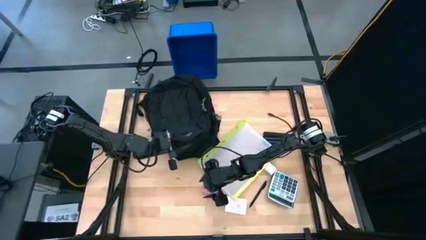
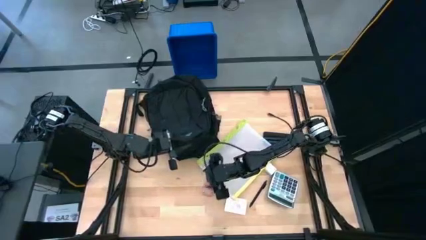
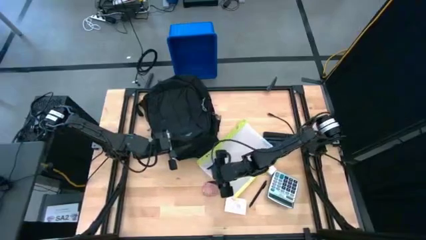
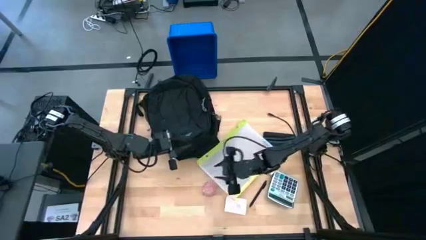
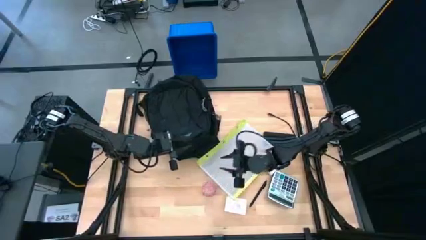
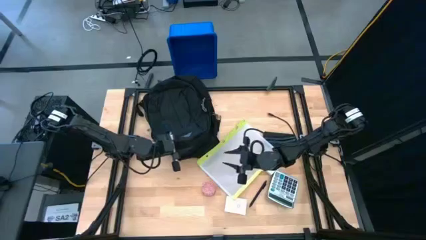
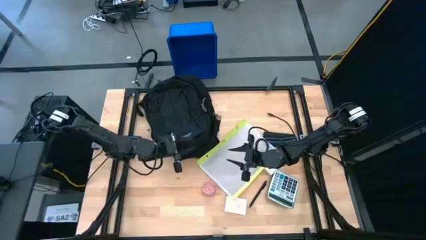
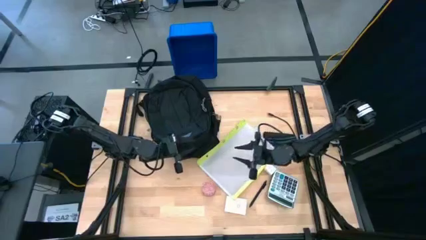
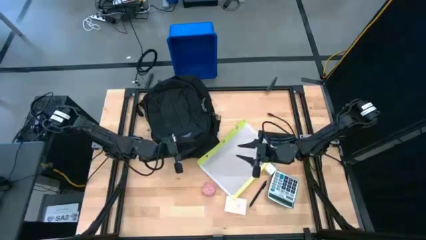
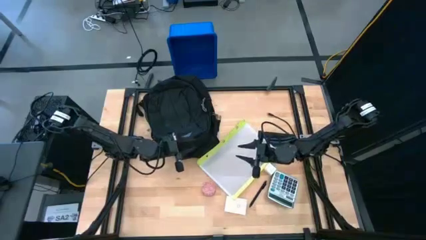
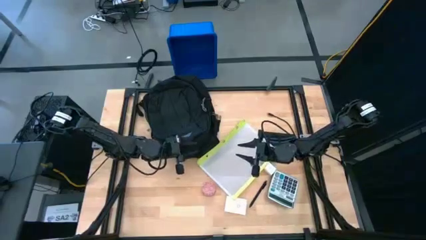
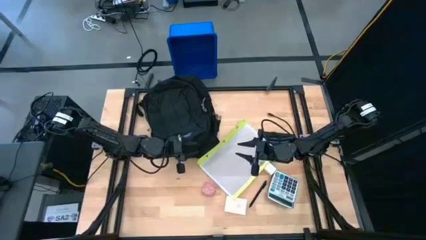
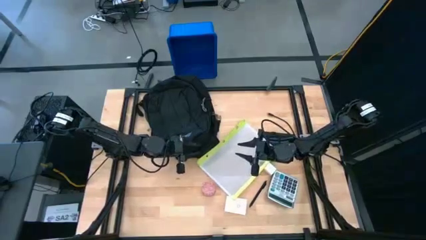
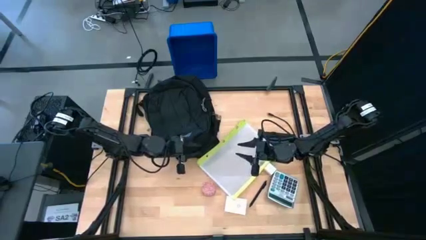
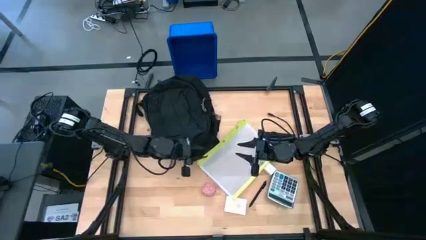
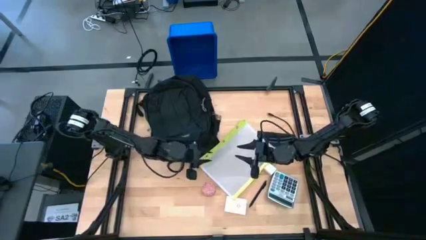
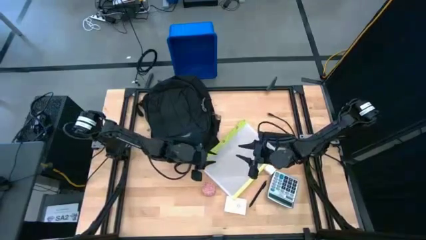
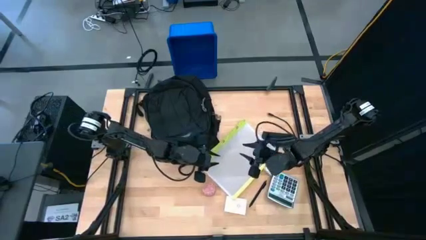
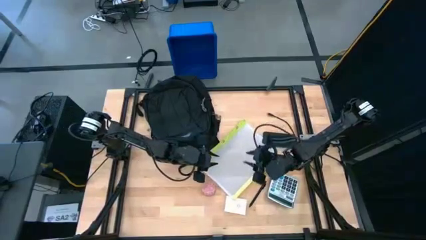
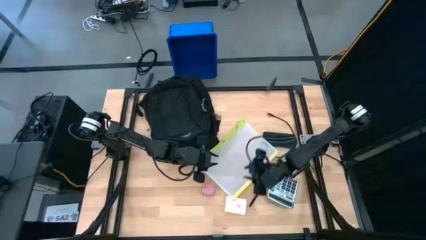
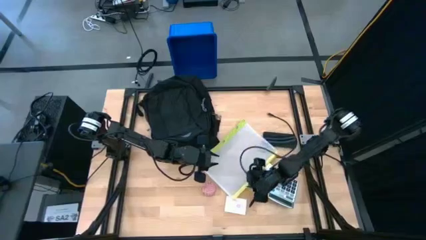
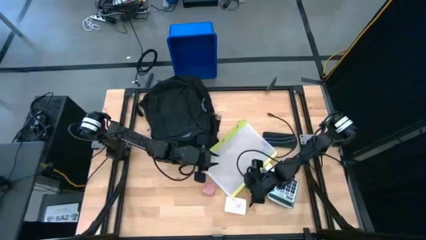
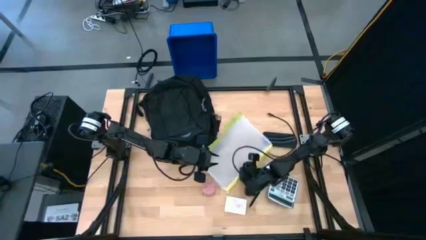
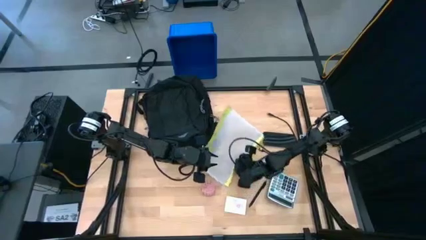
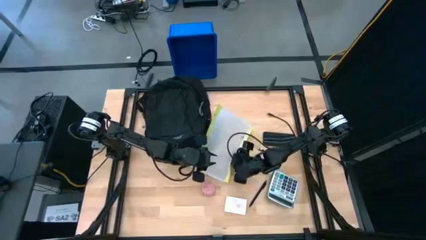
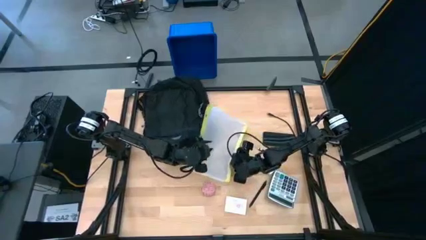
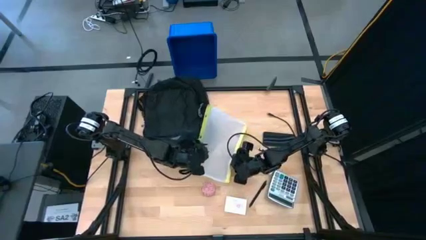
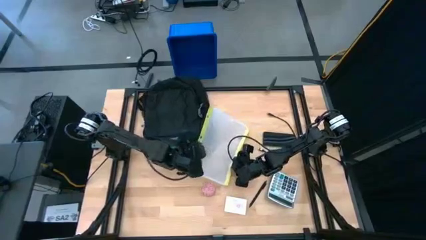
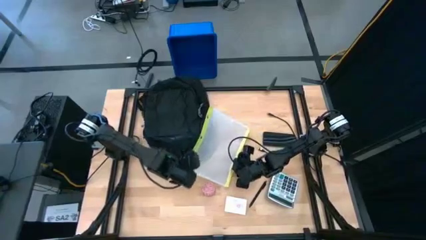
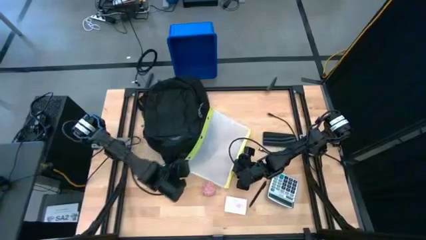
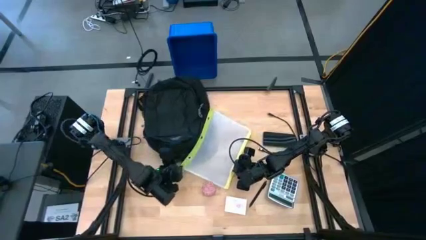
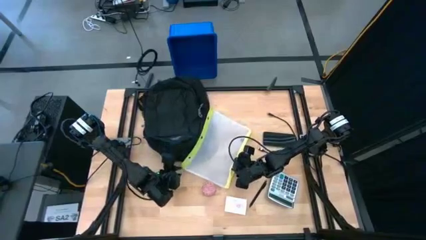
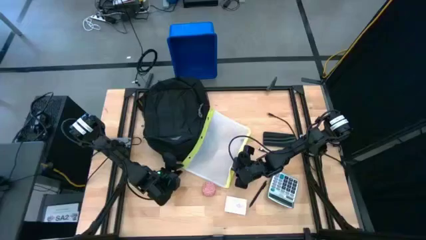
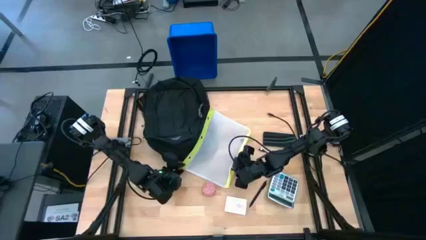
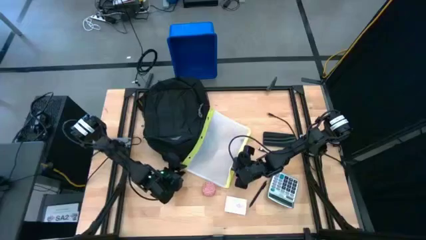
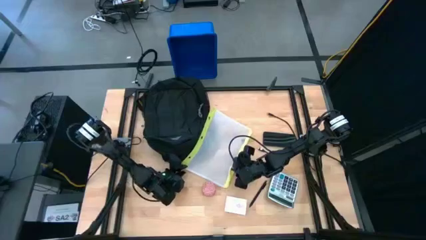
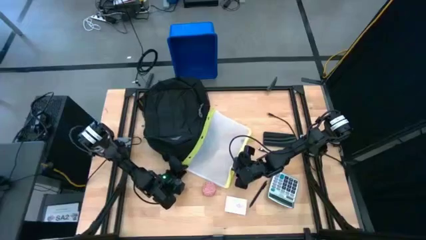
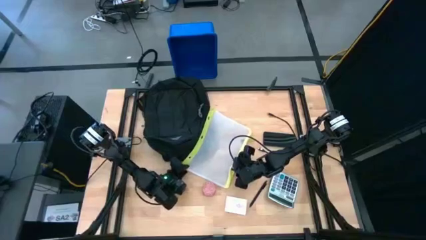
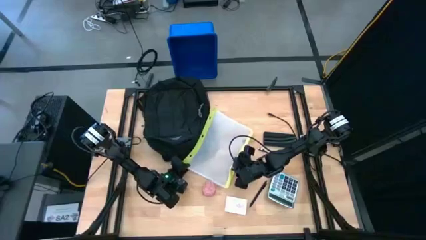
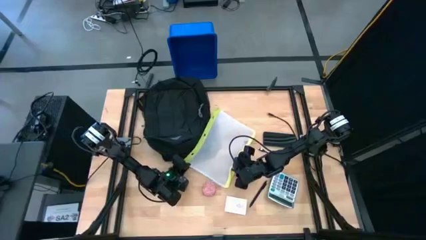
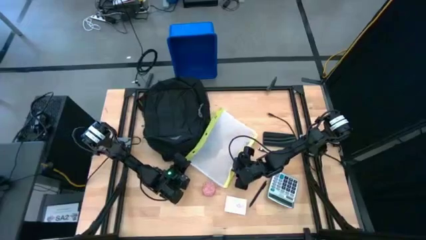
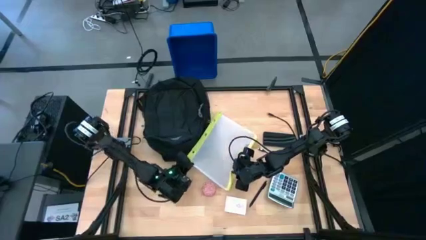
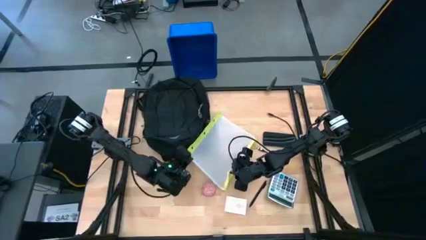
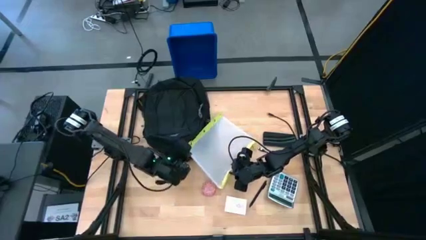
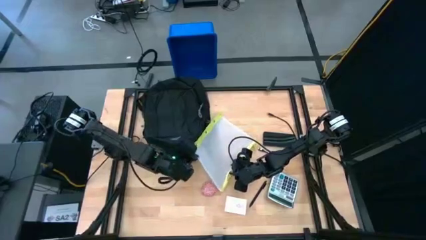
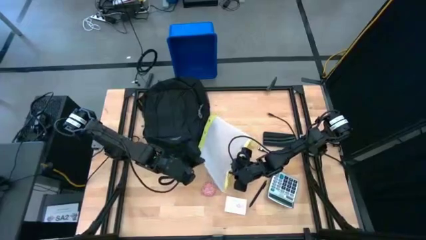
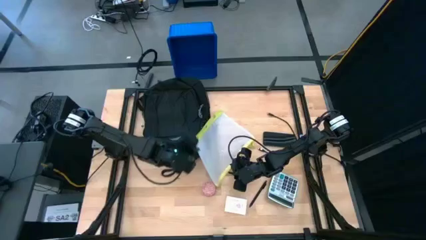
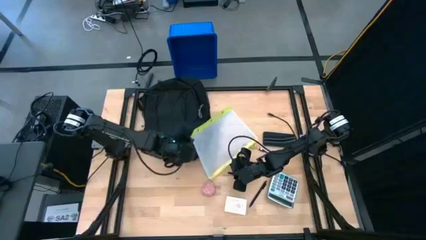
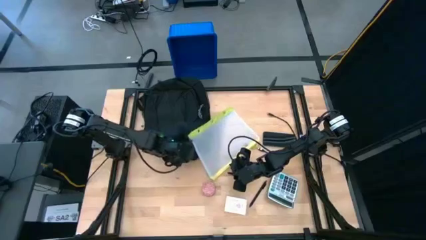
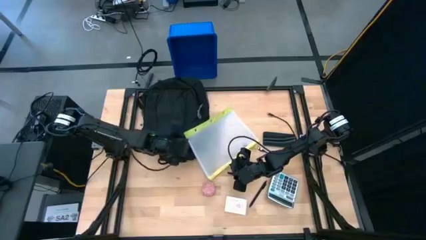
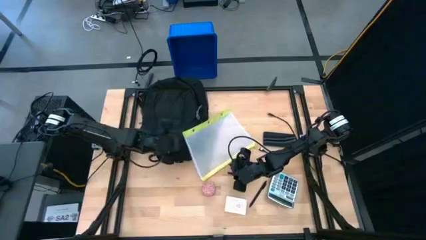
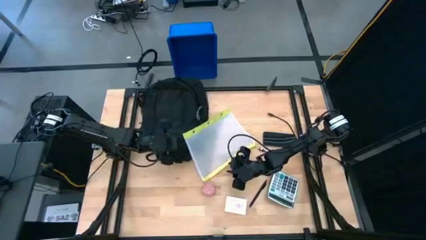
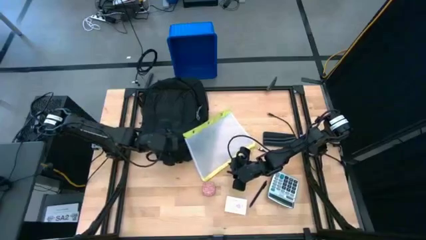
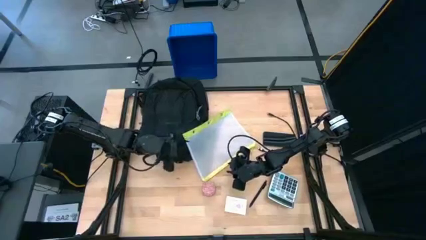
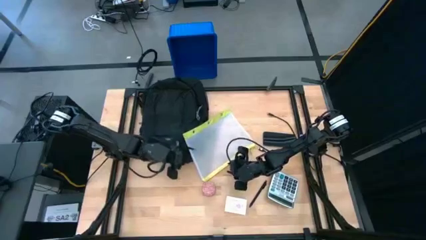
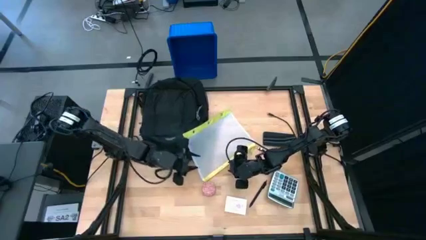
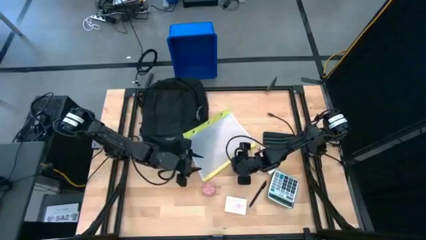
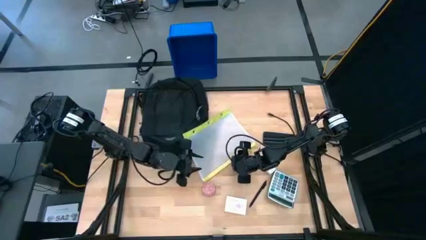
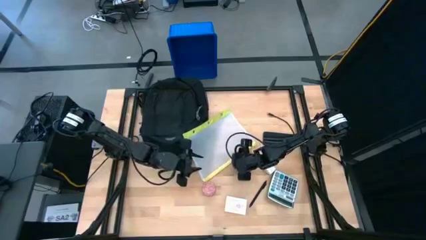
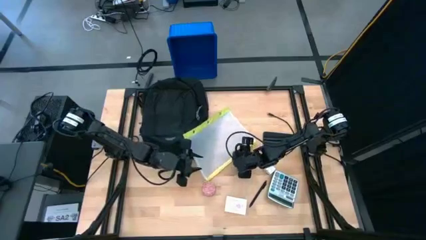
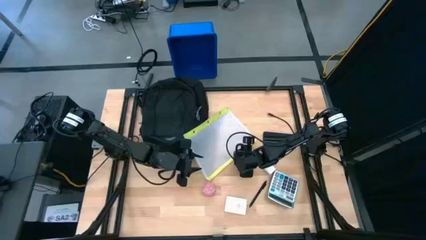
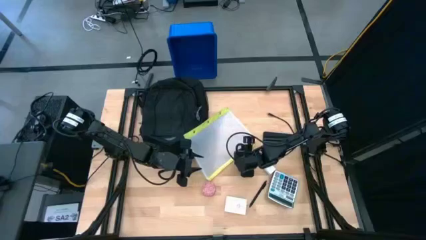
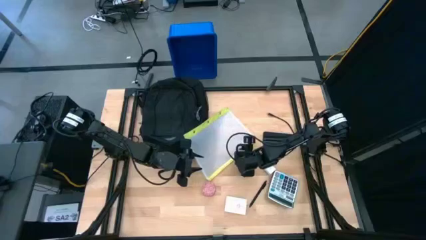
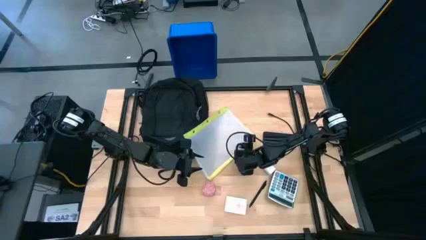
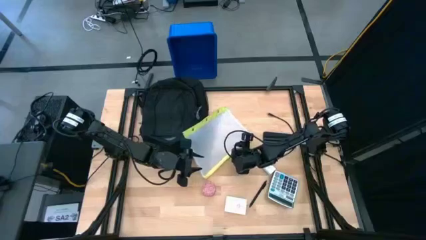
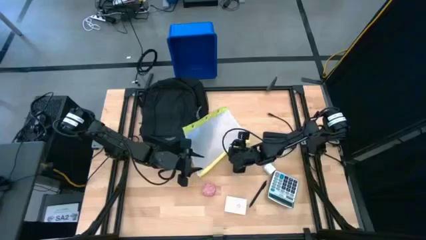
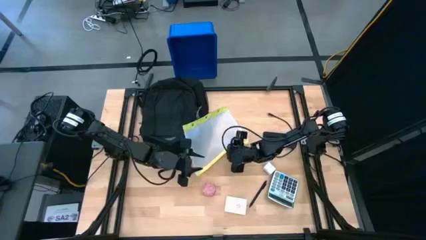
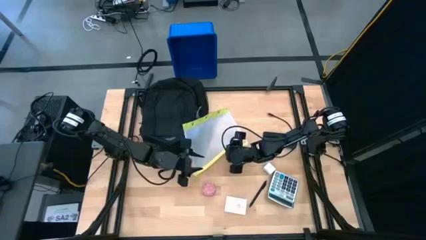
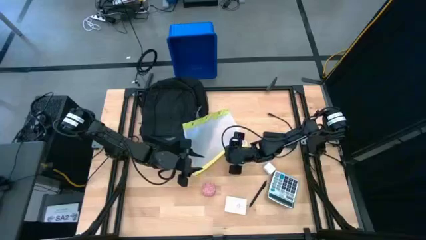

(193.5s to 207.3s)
Task: Unpack backpack
Put the red urn into the zip lock bag

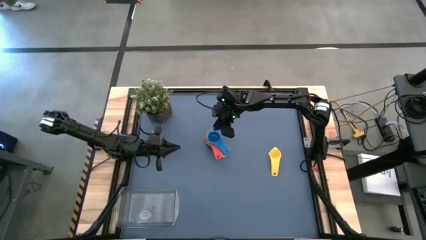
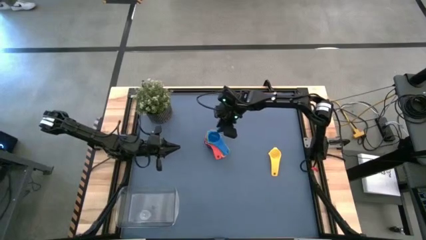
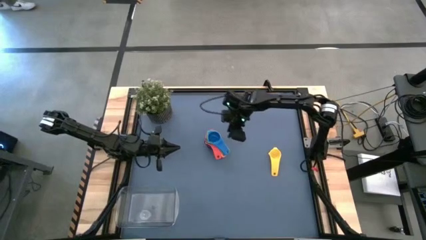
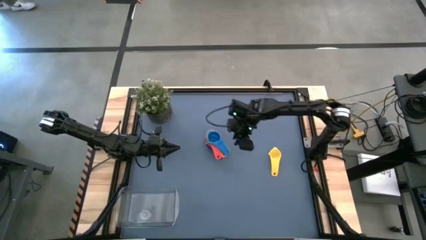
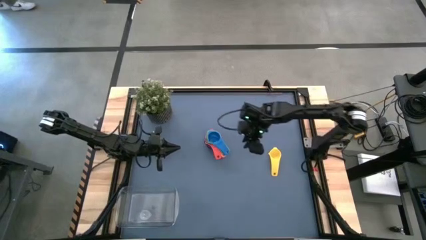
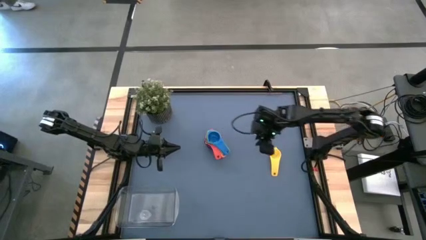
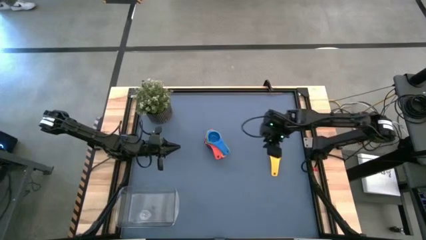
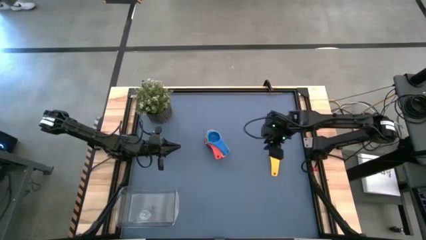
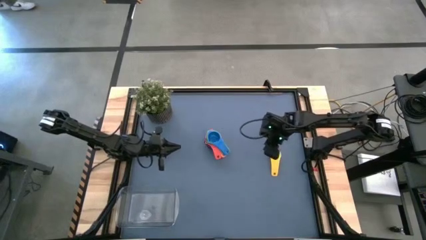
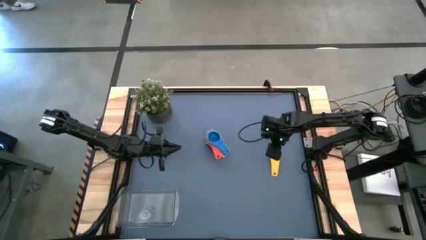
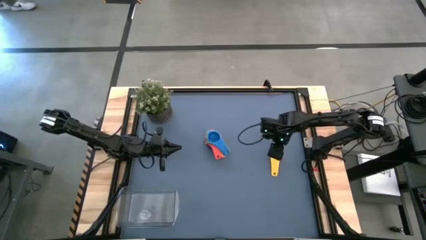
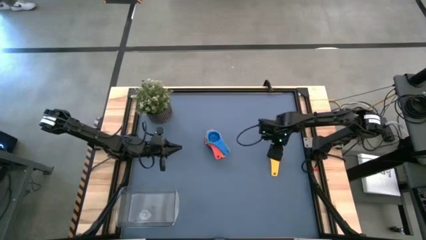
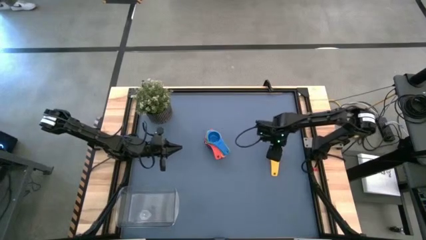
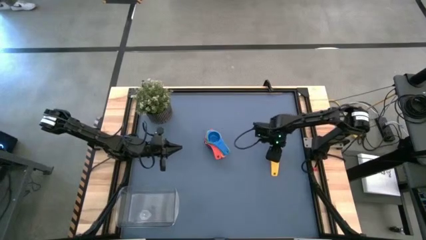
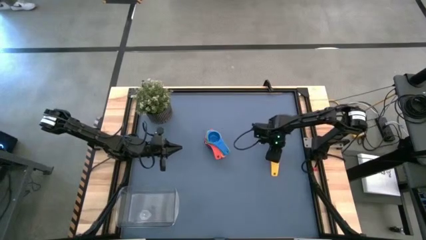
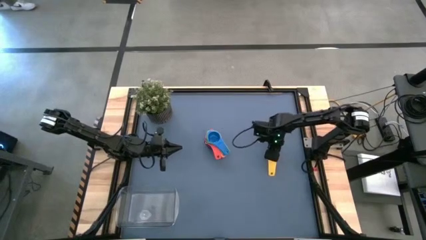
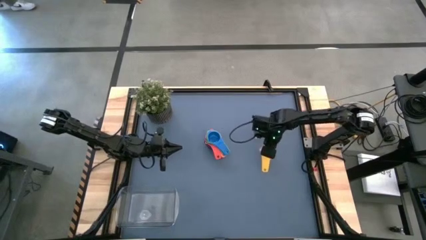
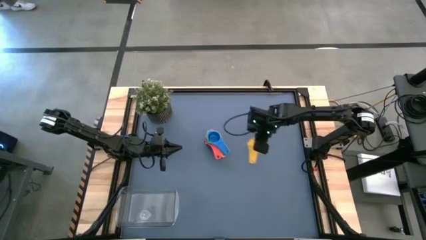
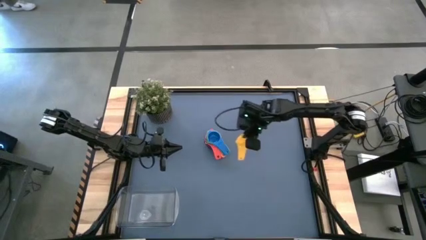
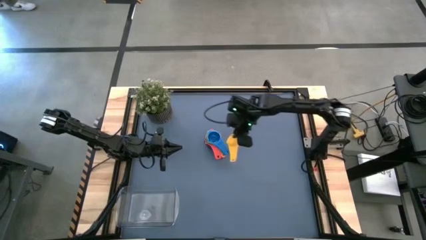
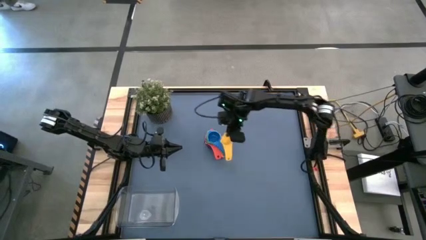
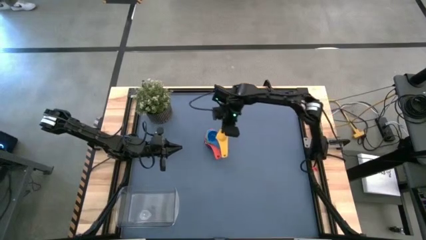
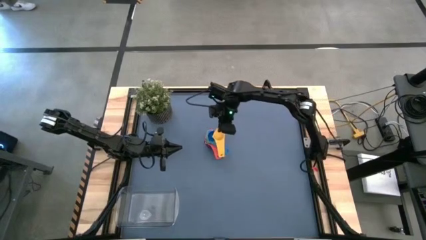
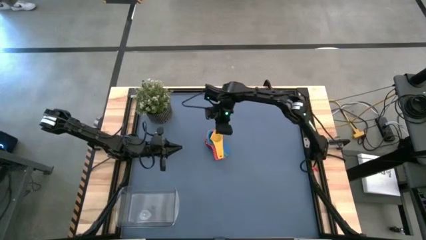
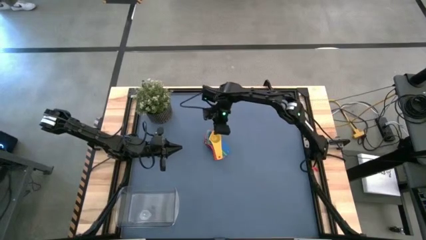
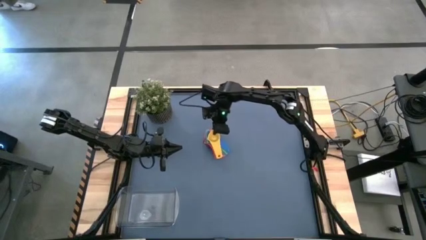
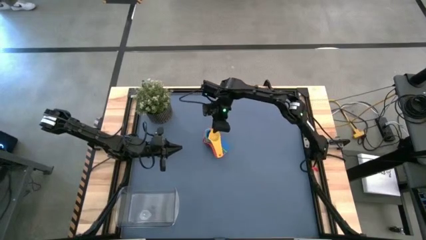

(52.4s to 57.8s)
Task: Nest measuring cups in basket
Stack the yellow measuring cup on top of the blue measuring cup
